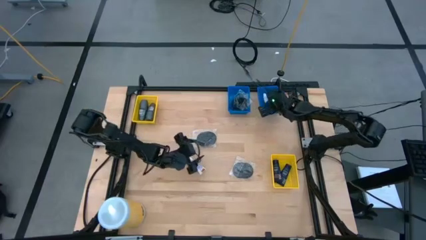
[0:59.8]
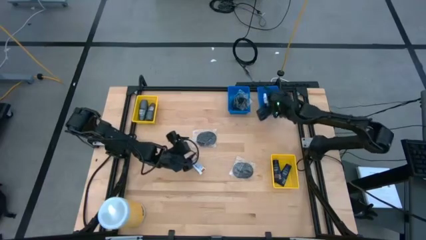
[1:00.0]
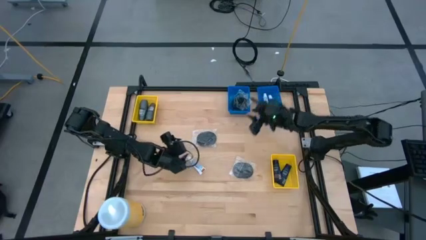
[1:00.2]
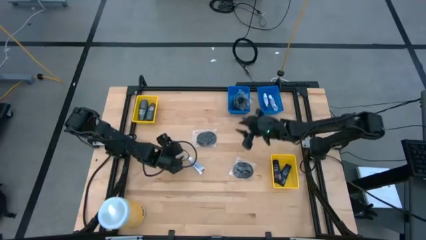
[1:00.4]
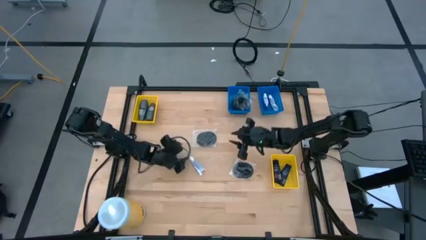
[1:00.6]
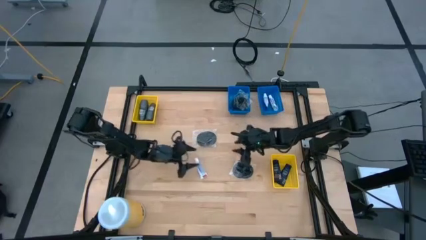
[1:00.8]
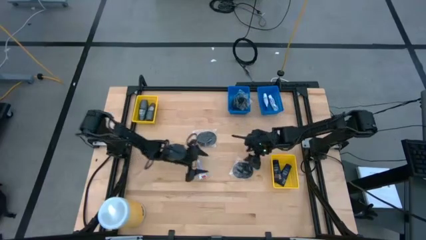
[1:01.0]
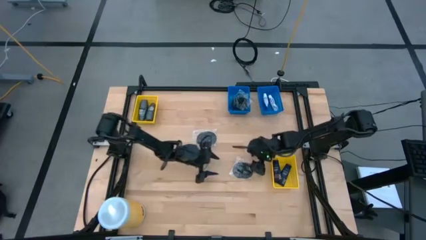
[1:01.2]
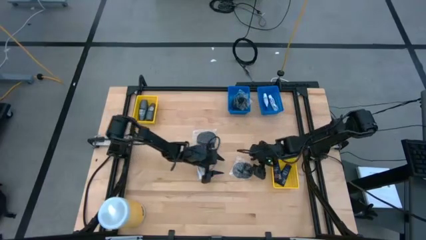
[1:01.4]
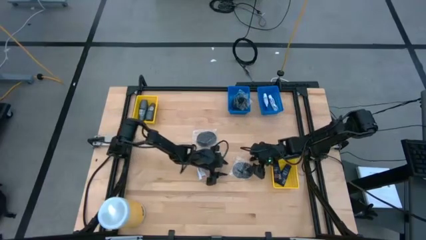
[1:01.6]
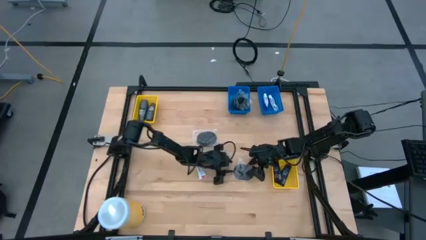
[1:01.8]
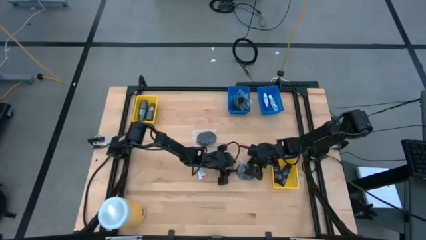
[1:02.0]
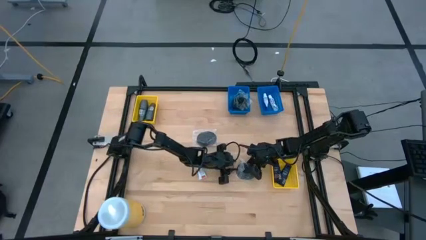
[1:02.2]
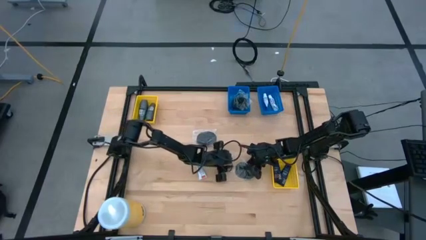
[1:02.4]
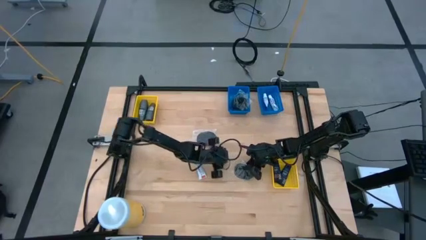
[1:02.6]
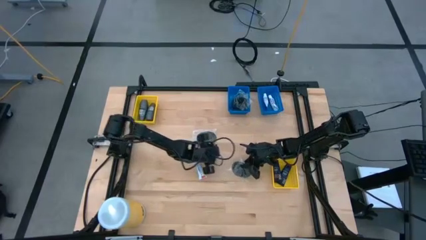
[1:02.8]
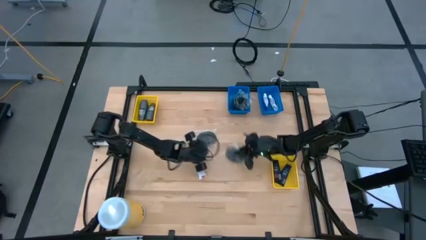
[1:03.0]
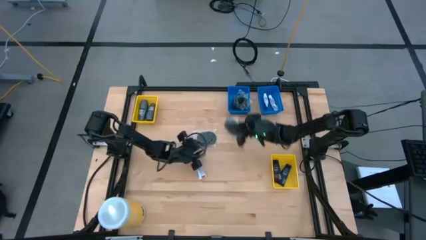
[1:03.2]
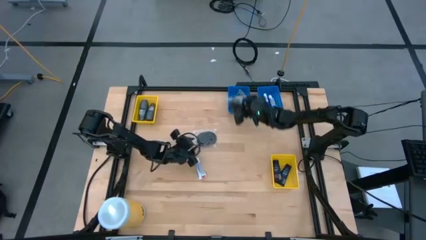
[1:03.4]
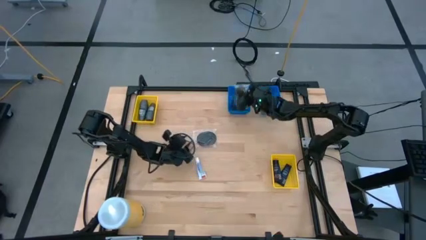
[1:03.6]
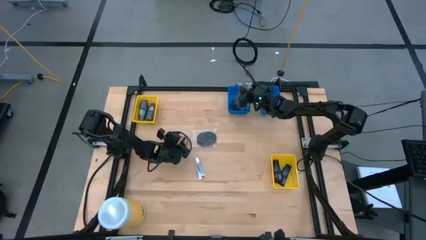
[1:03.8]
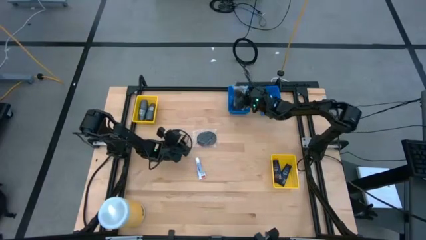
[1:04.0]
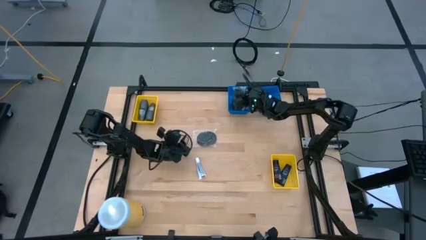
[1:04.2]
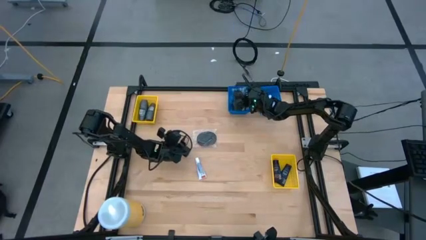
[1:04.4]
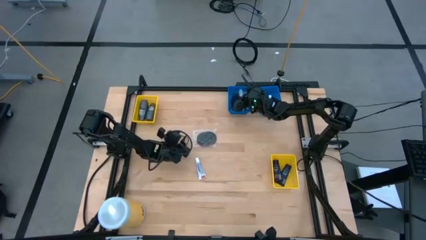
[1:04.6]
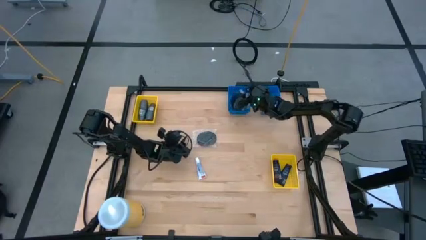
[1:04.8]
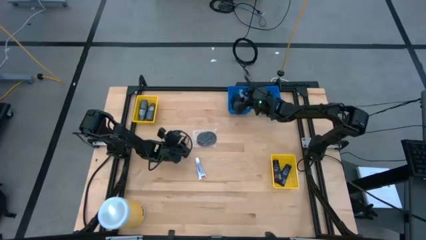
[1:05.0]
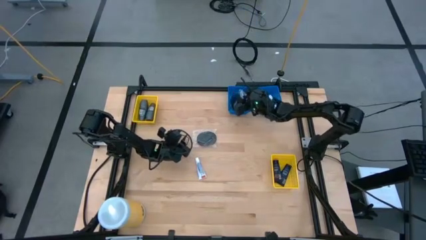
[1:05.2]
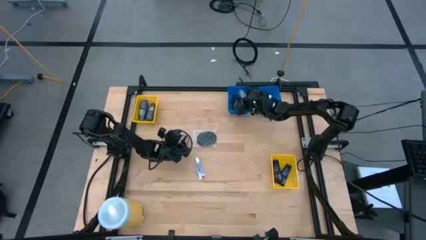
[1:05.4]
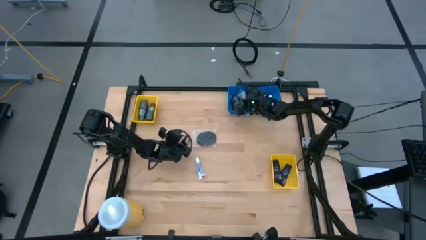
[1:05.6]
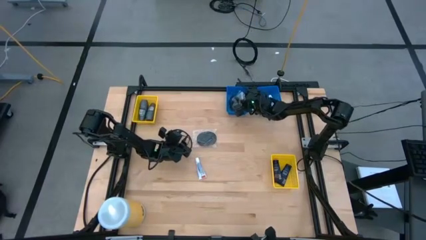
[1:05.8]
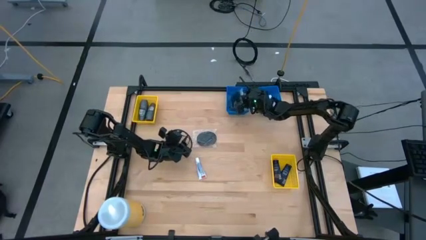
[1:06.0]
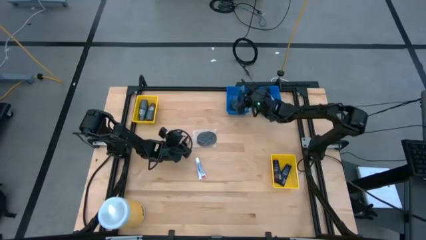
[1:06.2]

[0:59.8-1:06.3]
Task: Pick & Place Travel size toiletries
Put the black hairbrush into the left blue bin

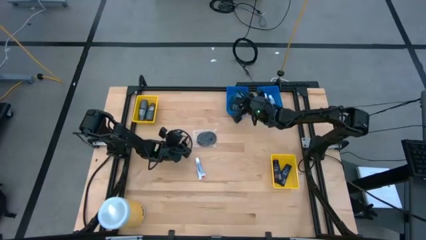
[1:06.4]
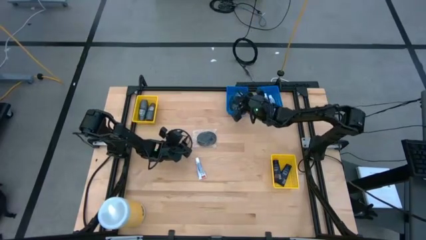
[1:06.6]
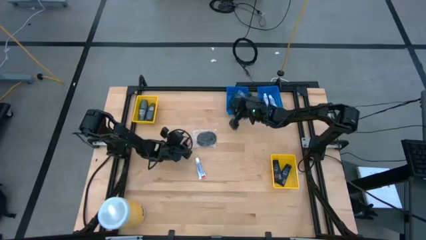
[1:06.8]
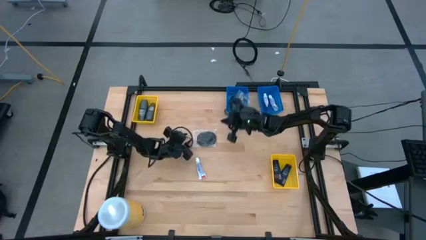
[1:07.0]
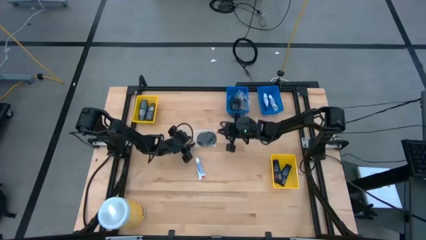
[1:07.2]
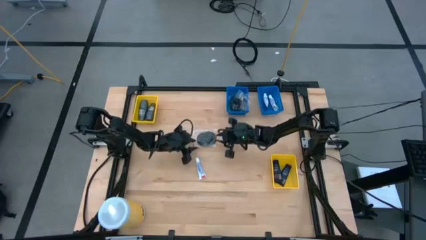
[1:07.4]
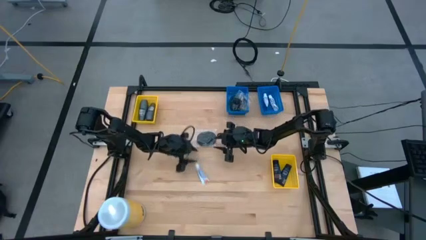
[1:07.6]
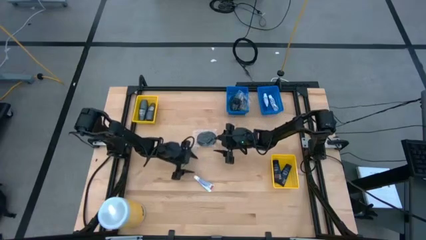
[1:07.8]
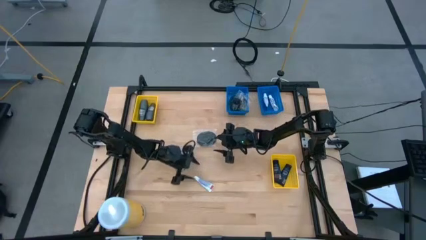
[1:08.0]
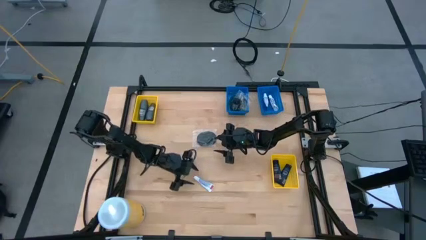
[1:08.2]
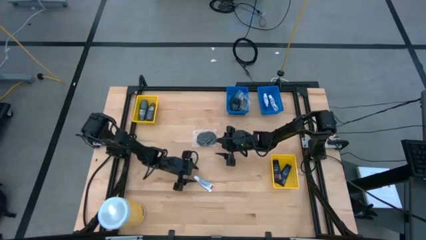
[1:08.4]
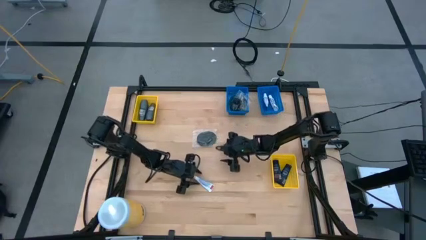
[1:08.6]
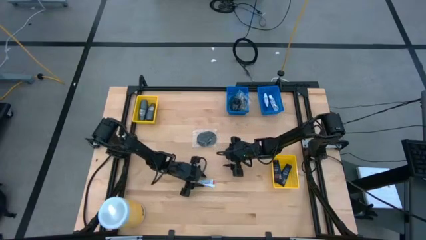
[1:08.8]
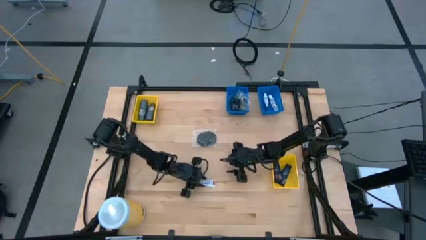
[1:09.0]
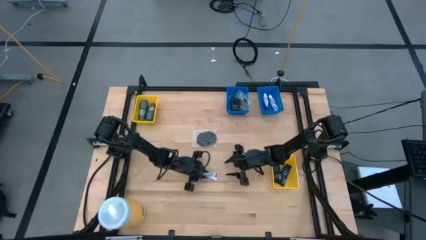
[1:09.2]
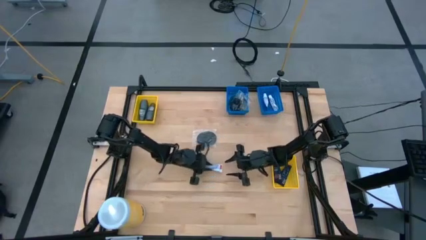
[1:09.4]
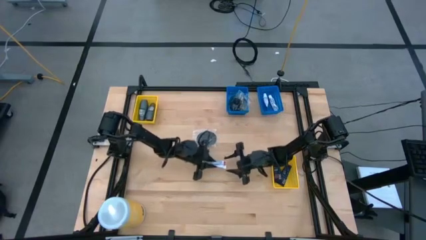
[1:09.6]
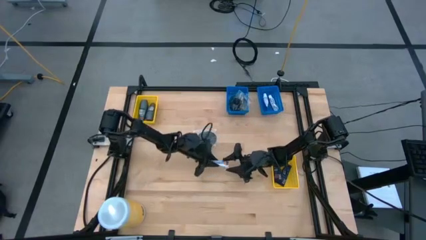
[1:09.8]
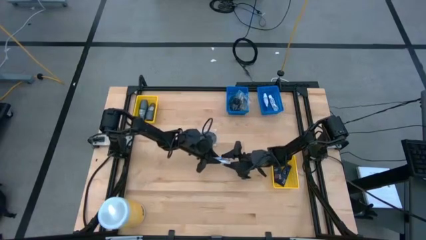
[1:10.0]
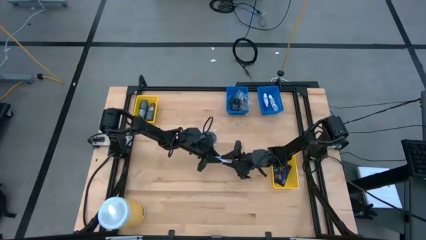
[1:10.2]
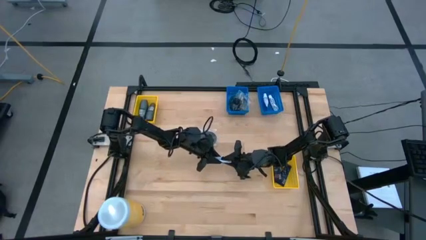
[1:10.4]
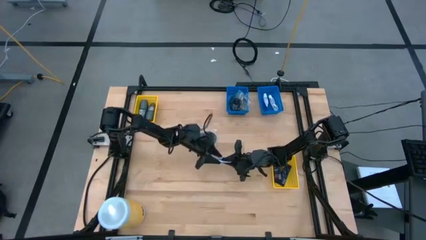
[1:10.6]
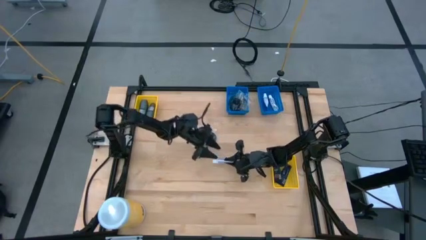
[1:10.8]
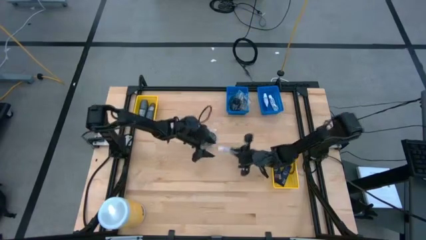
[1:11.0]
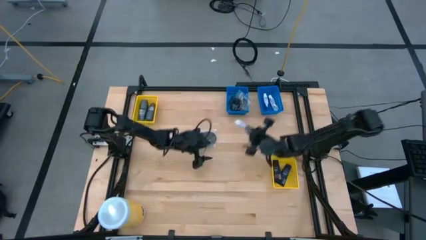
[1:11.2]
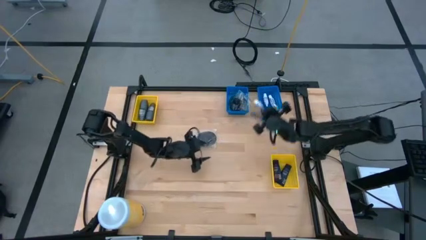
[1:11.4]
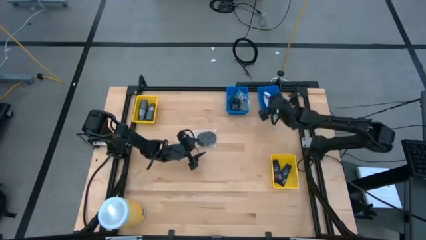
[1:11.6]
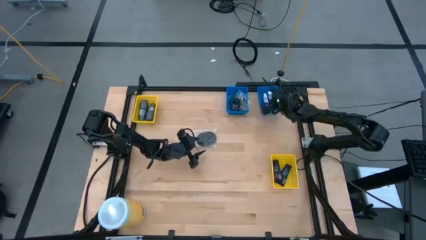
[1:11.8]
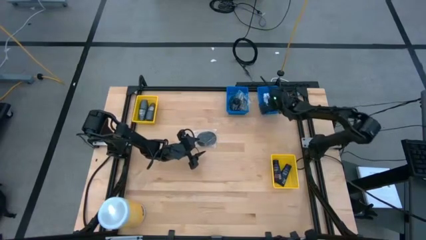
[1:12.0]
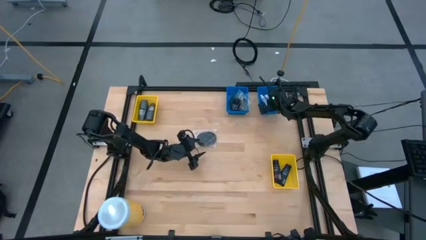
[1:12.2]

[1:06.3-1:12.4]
Put the white toothpaste into the right blue bin

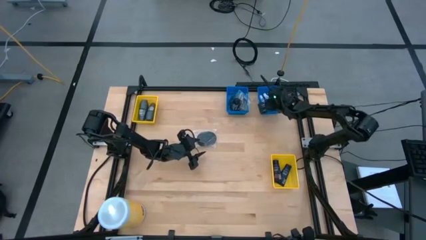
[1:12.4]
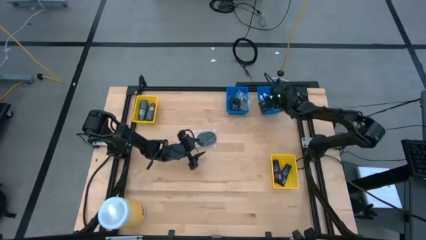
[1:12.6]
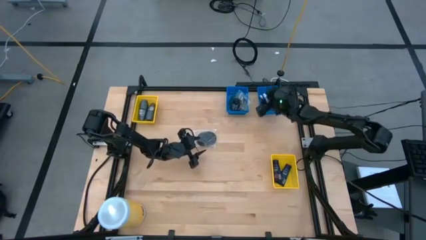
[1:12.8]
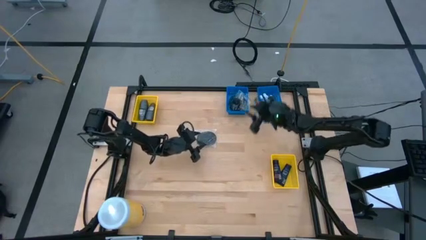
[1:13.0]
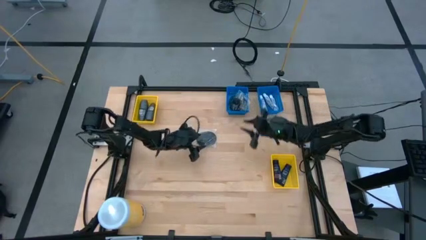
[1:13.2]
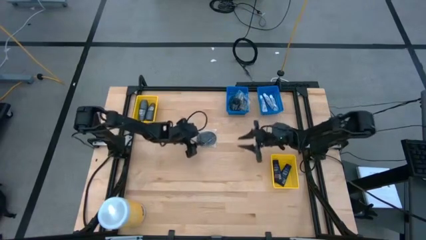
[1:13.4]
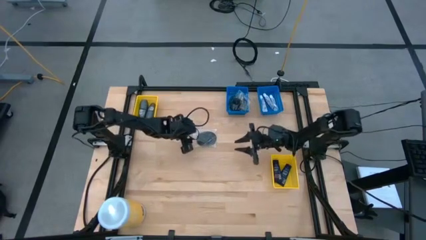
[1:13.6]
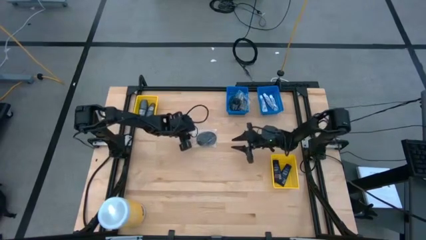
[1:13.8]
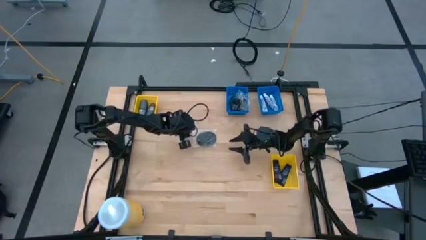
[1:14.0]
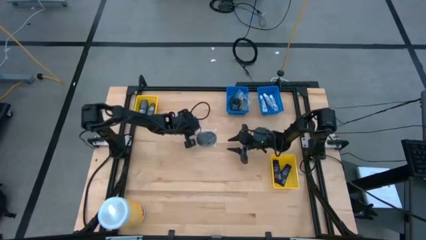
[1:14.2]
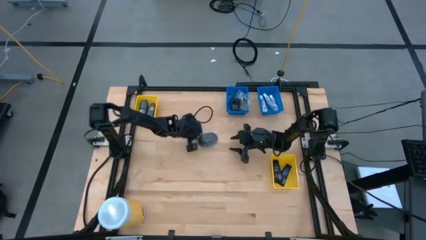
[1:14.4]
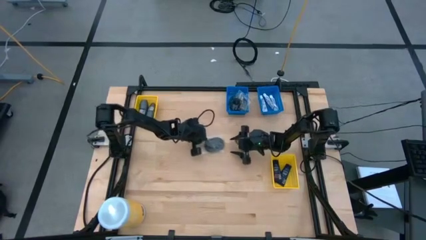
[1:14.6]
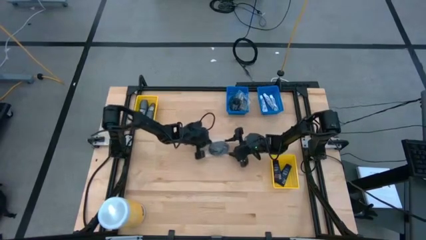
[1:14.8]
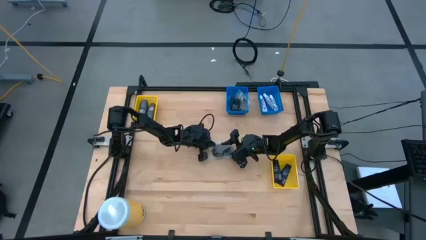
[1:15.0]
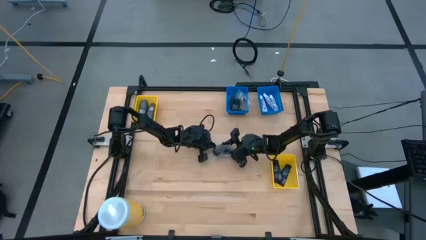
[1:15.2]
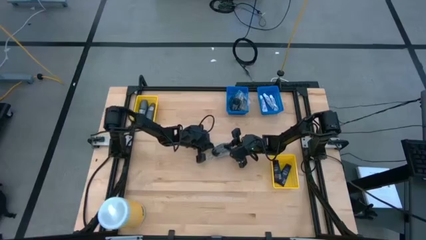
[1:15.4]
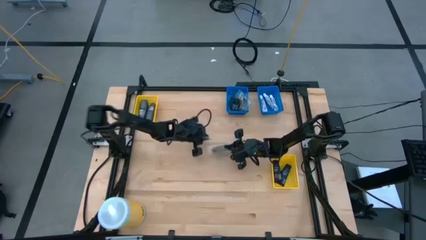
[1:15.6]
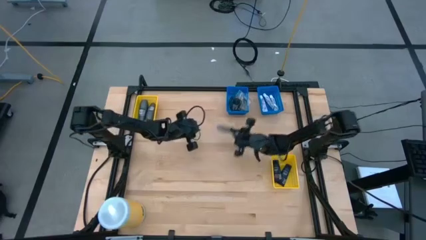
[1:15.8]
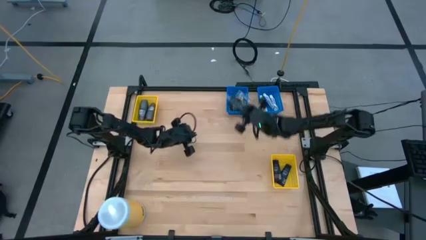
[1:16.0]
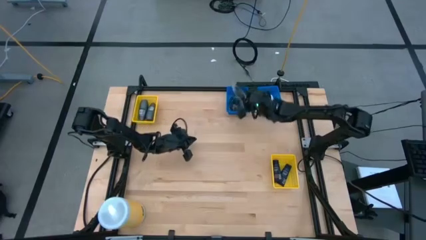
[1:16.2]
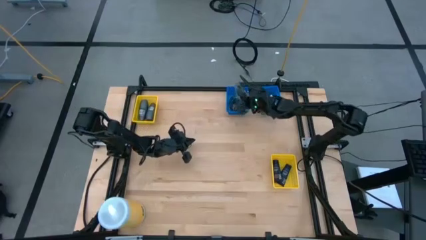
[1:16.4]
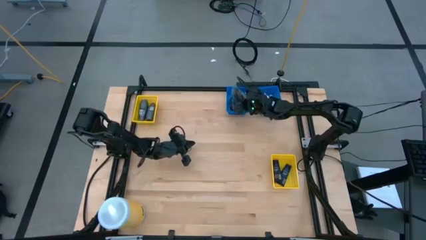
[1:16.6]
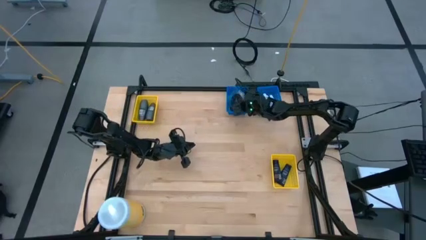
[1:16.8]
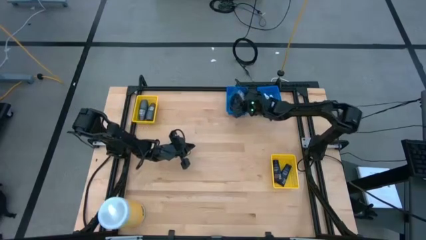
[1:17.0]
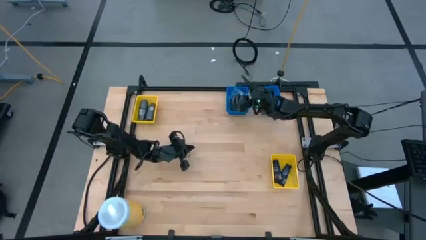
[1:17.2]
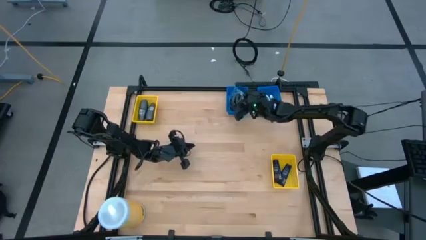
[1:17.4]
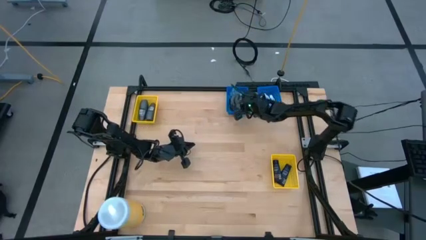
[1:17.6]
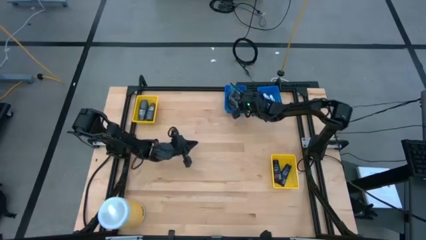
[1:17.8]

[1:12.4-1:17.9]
Put the black hairbrush into the left blue bin
